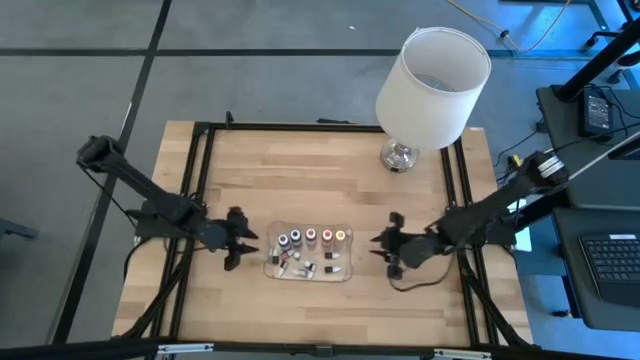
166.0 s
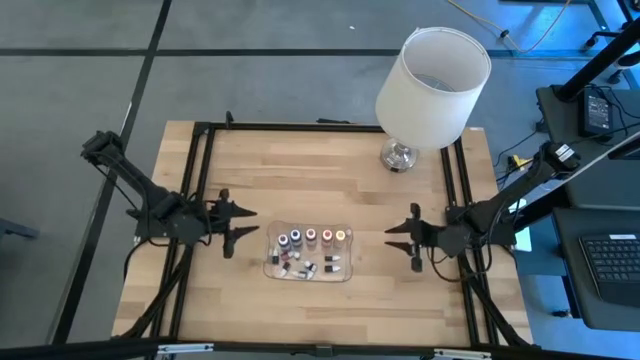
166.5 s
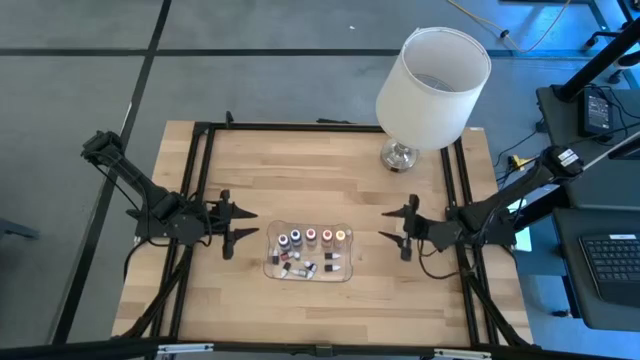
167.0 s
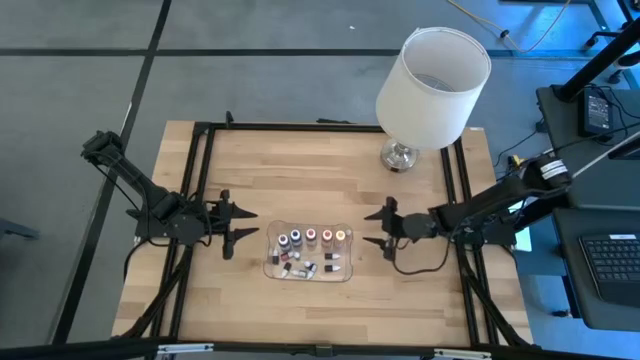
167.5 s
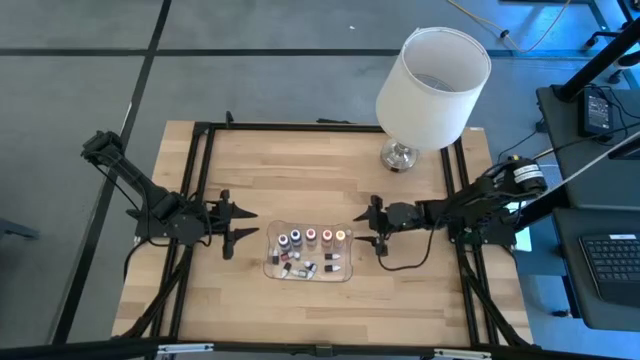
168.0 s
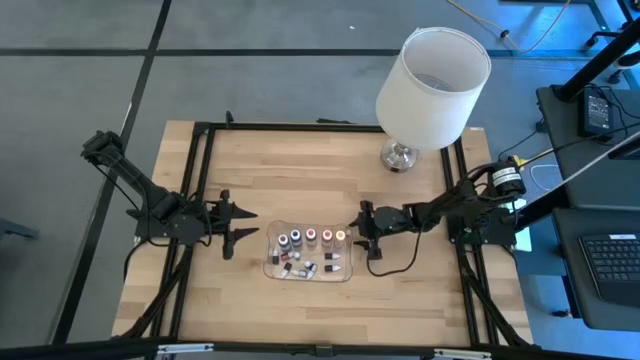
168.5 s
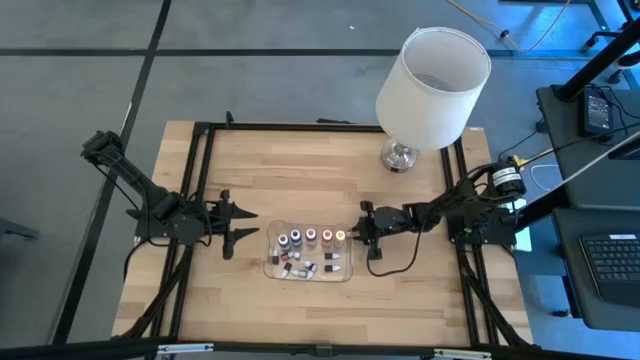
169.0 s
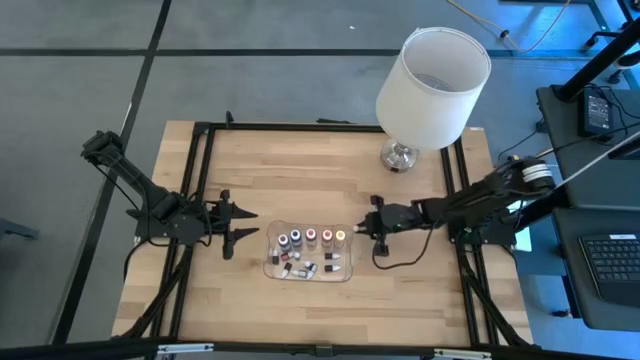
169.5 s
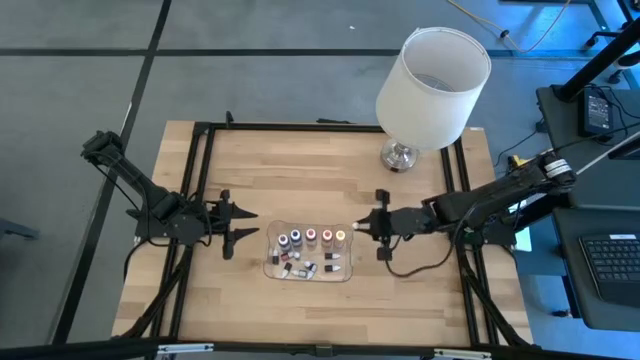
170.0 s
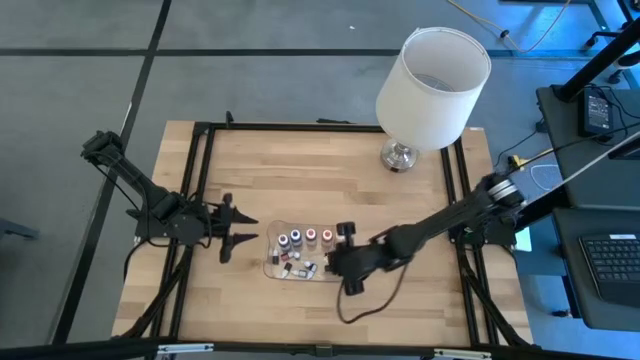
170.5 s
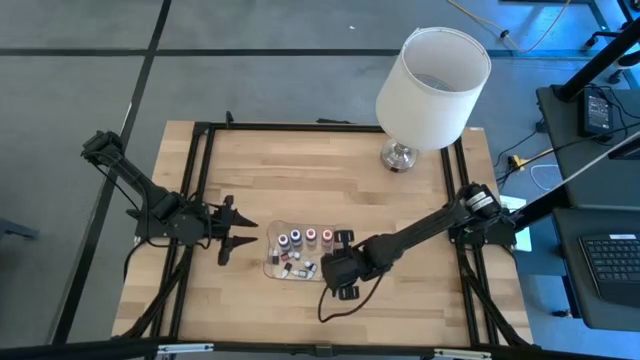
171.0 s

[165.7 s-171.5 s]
Task: Pick & Place food coloring
Put the small red food coloring bottle into the container

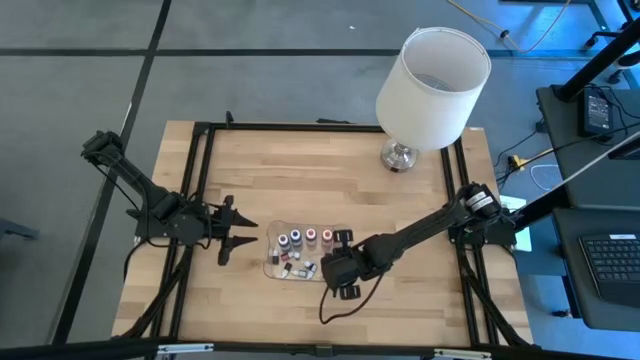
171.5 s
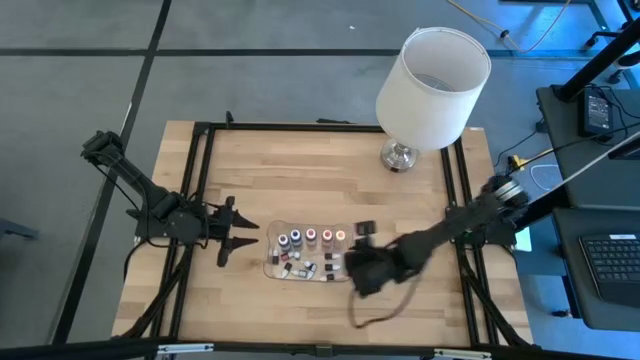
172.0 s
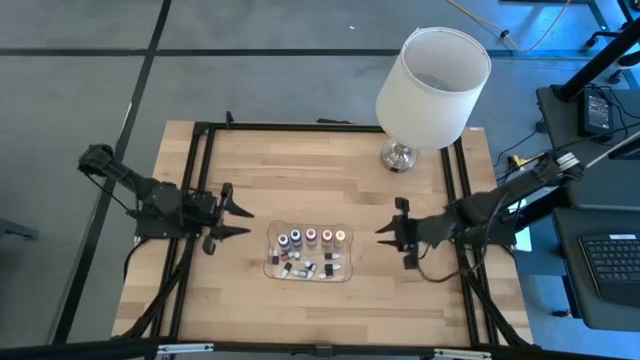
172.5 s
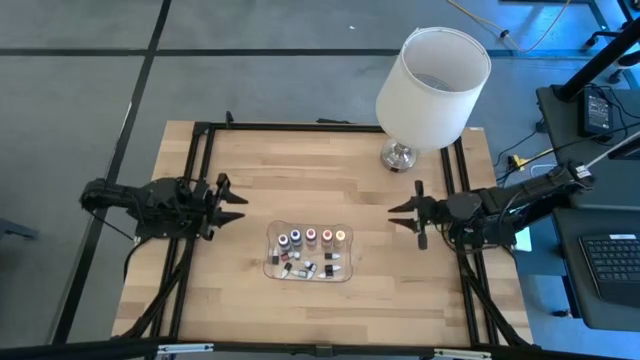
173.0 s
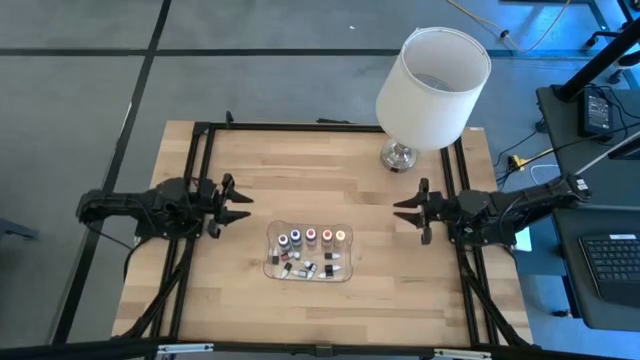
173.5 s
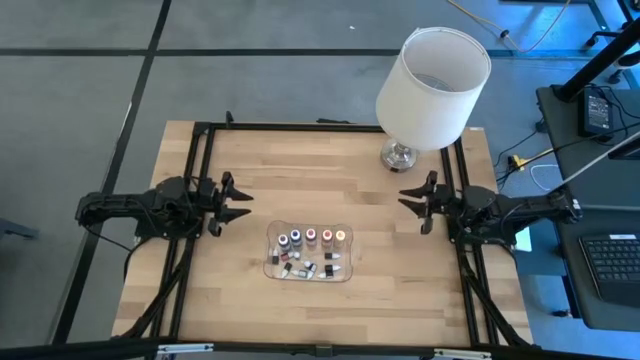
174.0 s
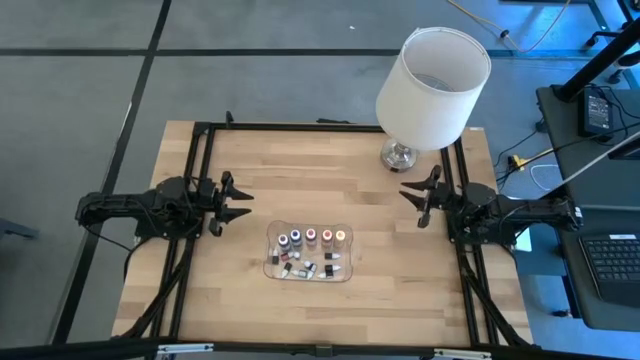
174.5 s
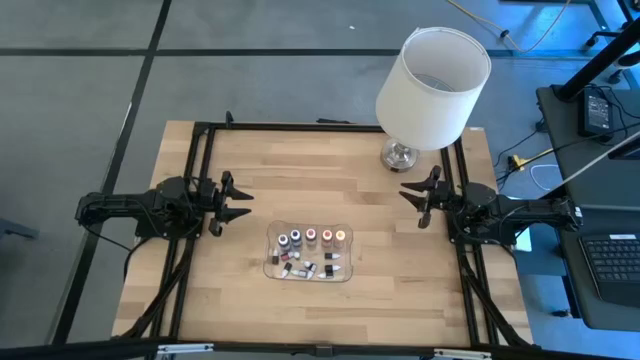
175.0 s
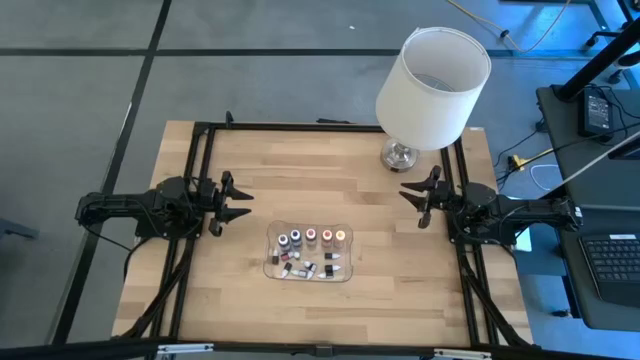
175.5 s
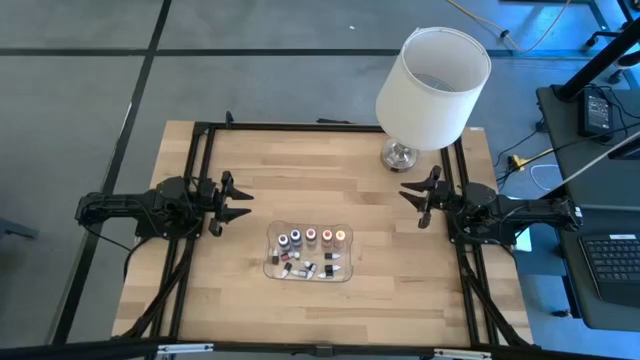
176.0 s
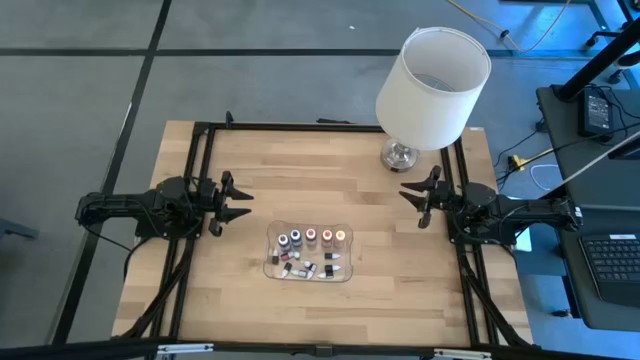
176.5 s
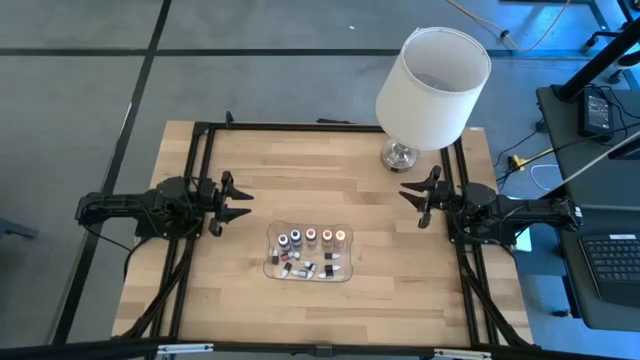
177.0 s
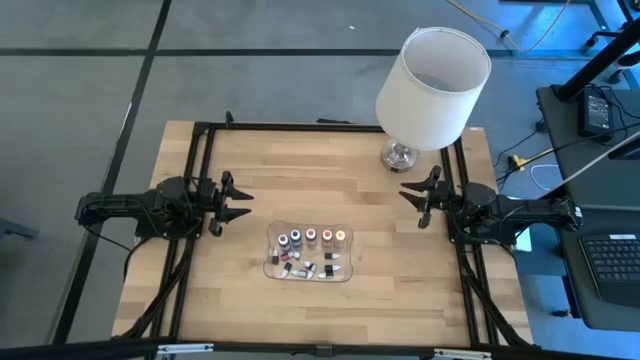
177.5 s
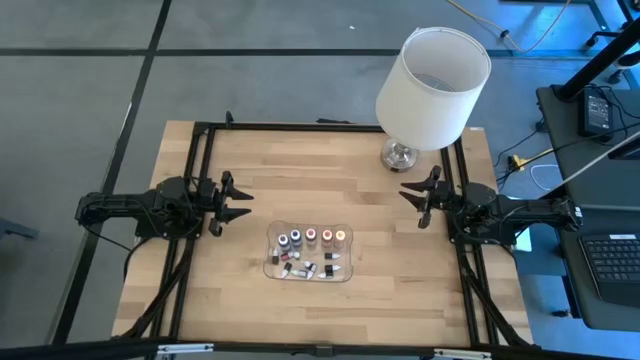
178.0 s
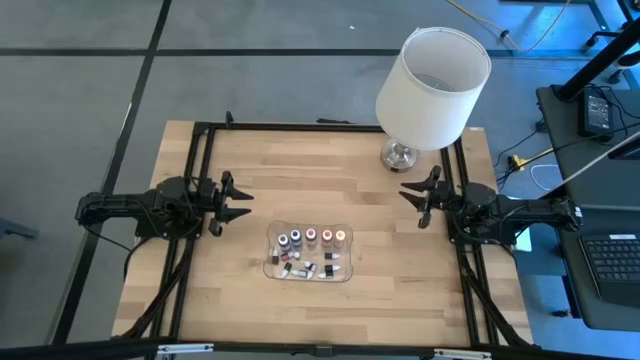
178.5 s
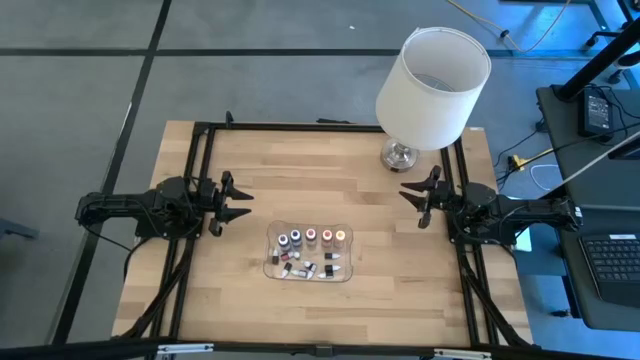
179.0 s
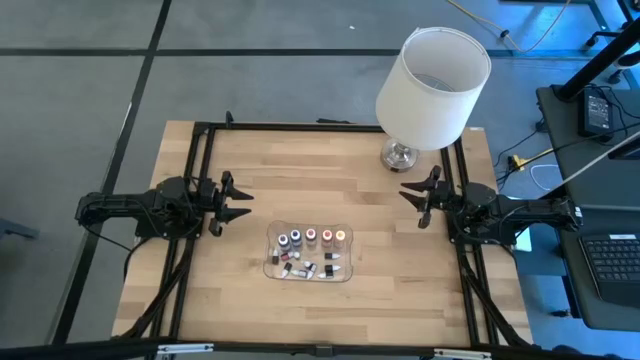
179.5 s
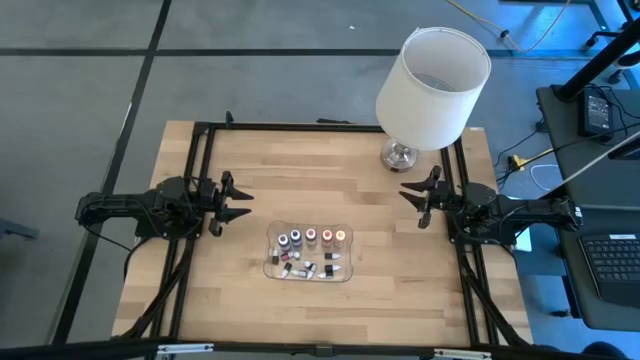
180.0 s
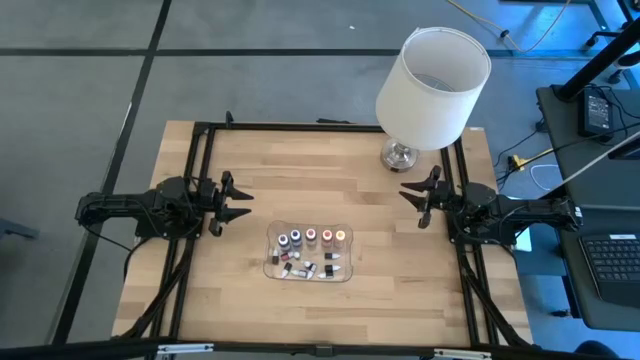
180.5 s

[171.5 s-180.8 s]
Return to Home Position

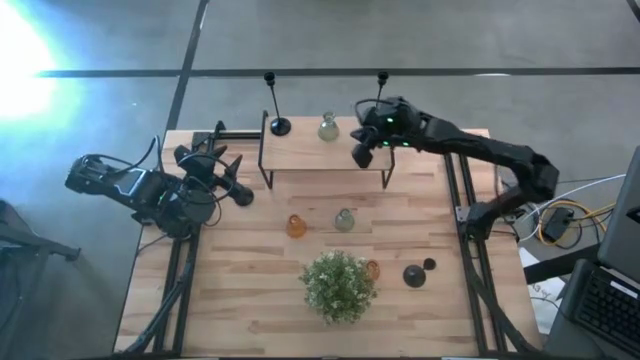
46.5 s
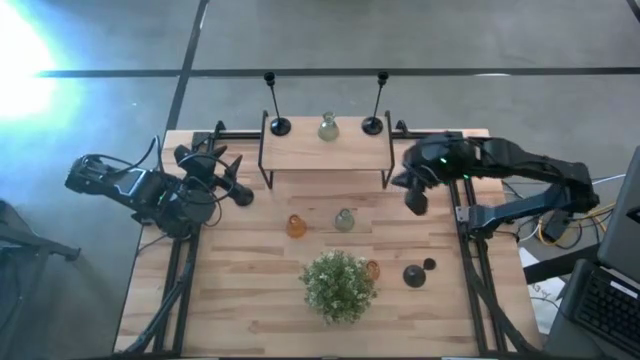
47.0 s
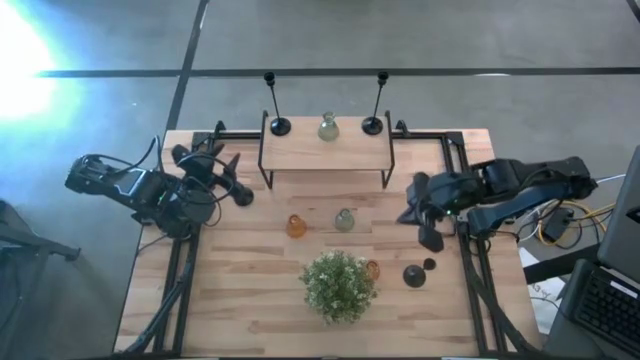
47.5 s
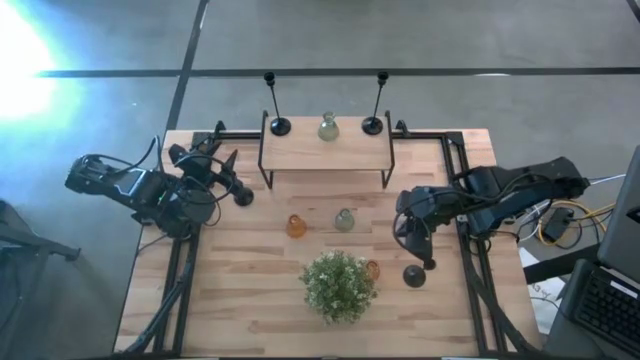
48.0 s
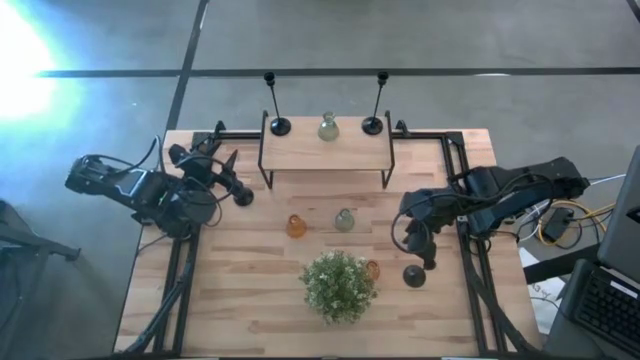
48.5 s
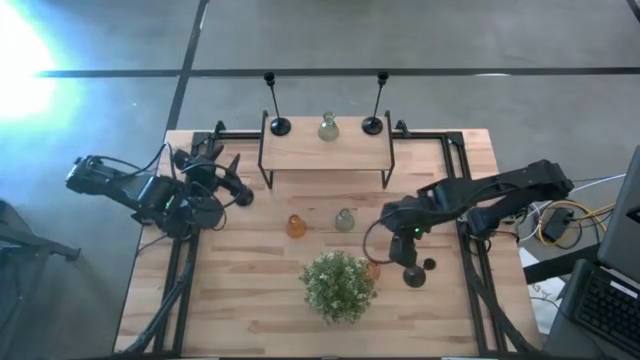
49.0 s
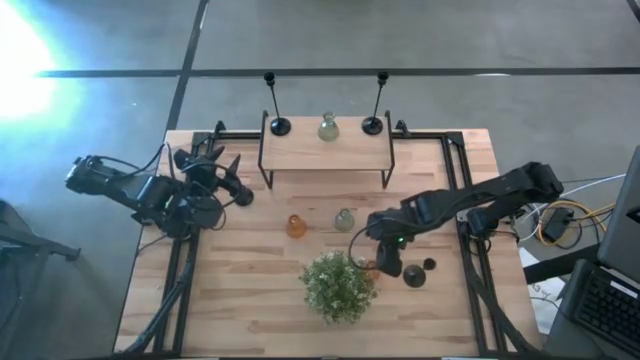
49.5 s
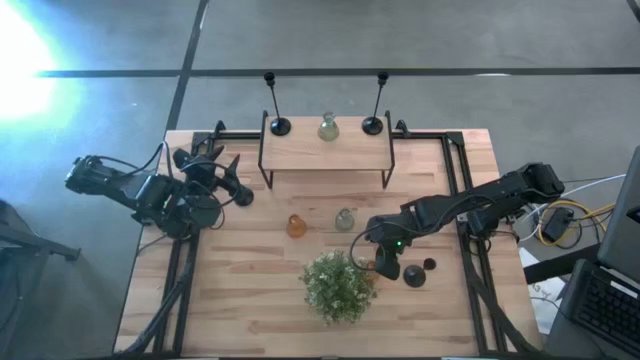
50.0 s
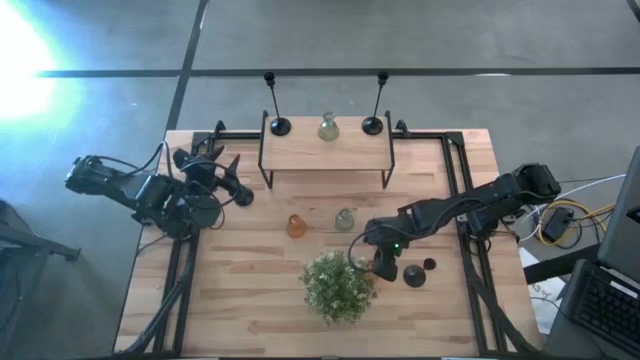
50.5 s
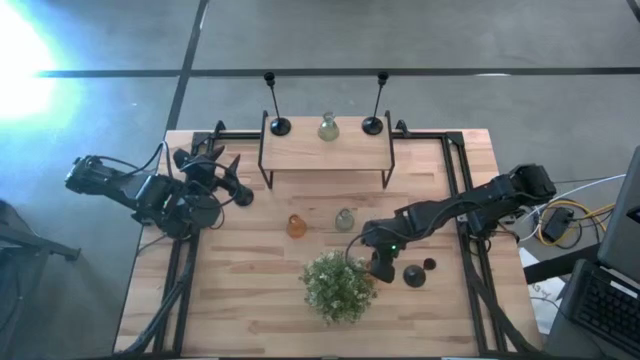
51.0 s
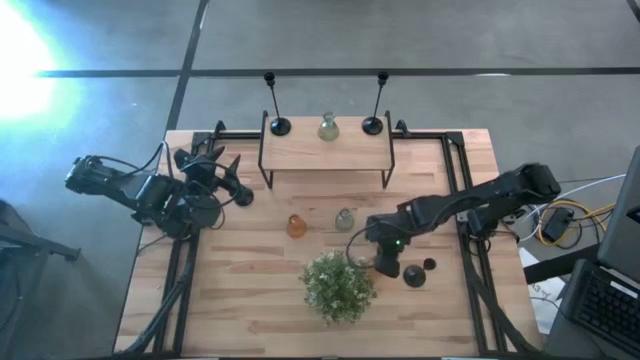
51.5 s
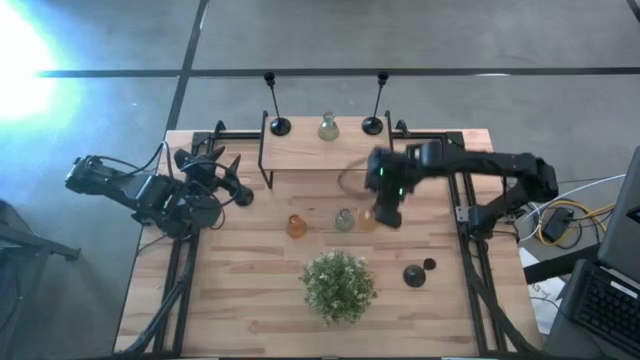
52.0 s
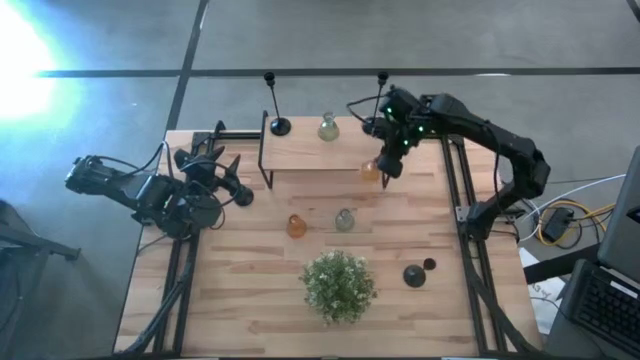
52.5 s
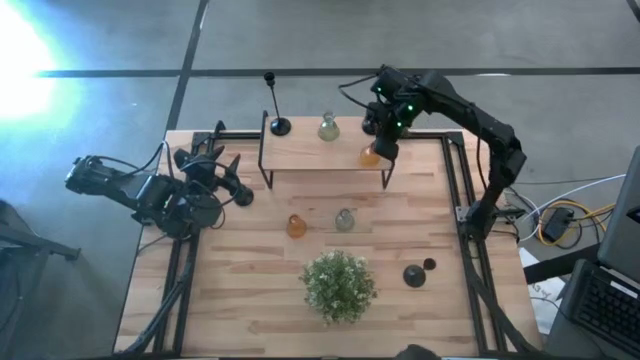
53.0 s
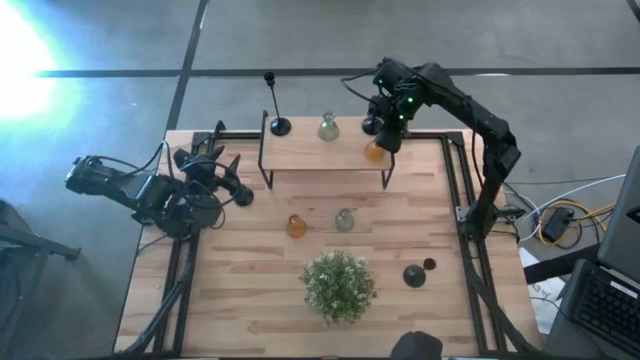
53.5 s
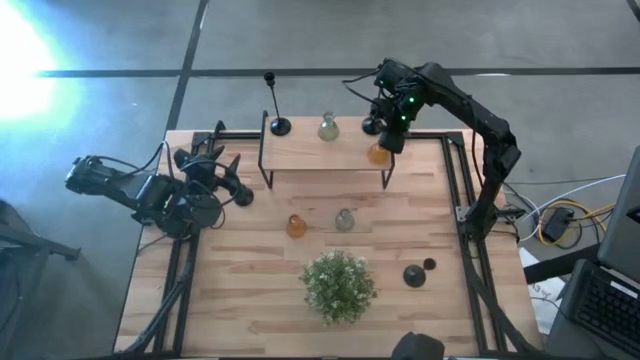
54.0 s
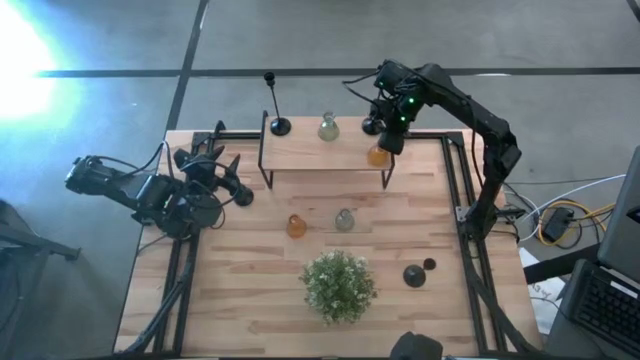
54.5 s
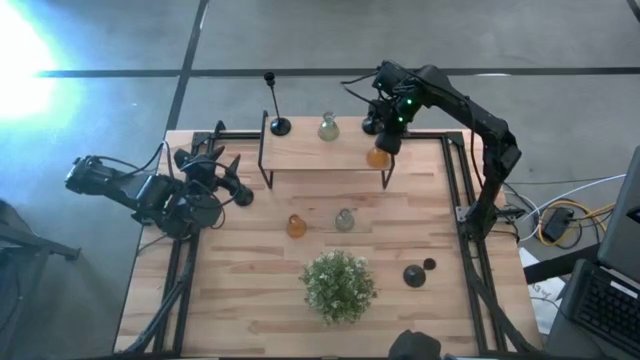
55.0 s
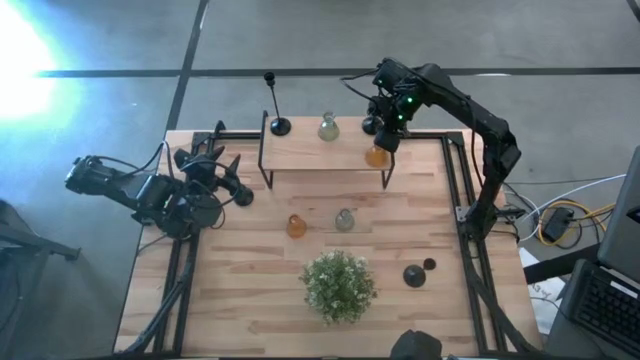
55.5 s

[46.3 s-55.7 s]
Task: Pick & Place candle stick holders
Put the right orange glass candle holder on the shelf
